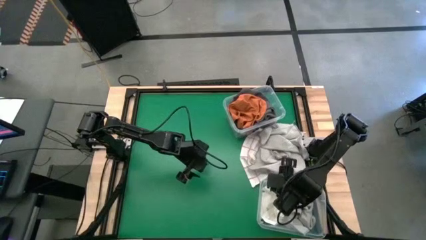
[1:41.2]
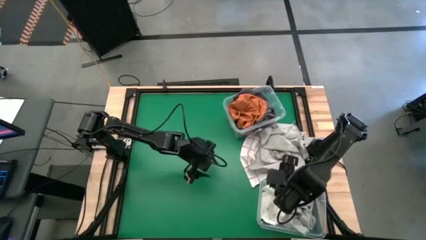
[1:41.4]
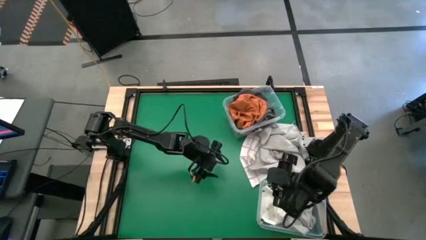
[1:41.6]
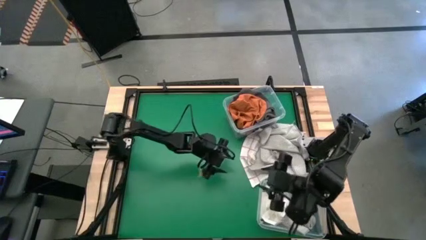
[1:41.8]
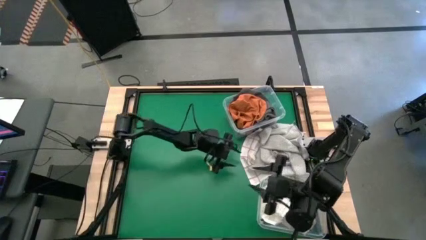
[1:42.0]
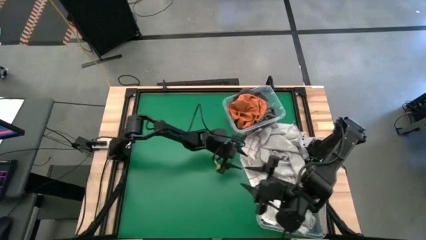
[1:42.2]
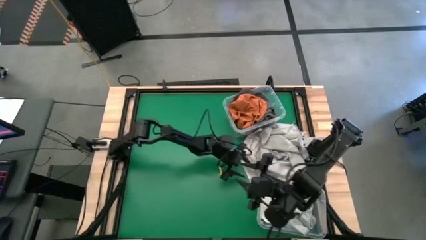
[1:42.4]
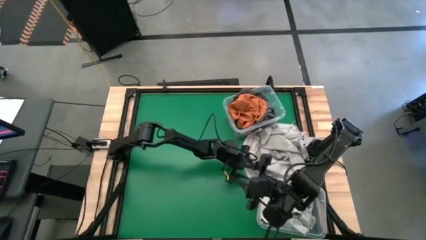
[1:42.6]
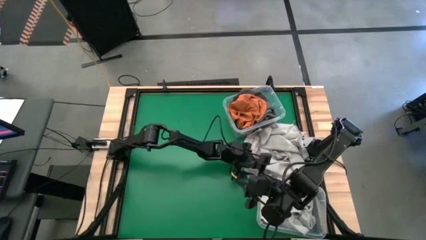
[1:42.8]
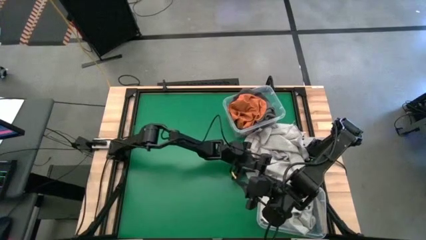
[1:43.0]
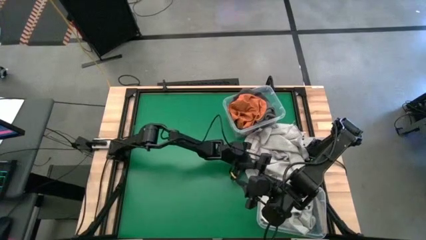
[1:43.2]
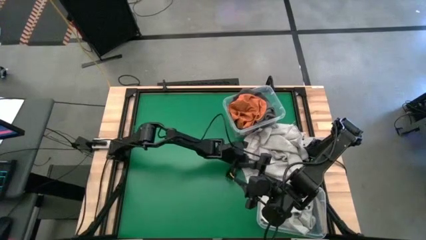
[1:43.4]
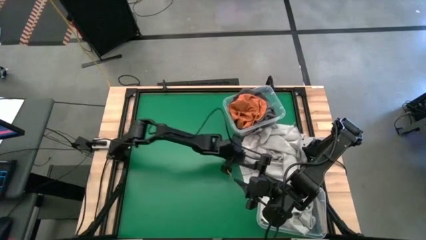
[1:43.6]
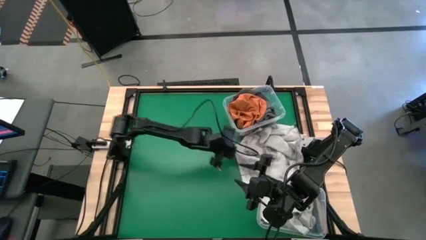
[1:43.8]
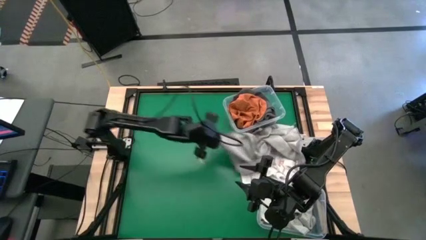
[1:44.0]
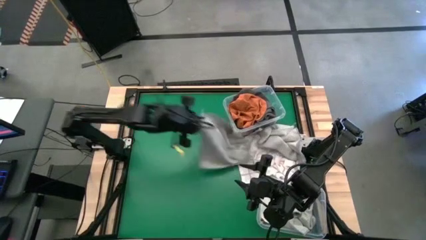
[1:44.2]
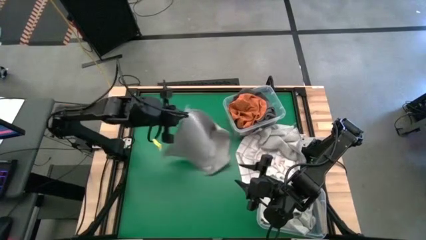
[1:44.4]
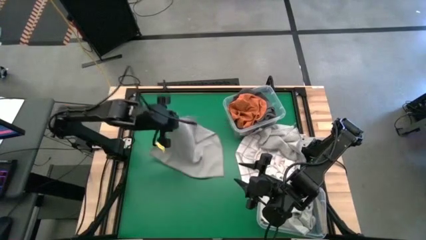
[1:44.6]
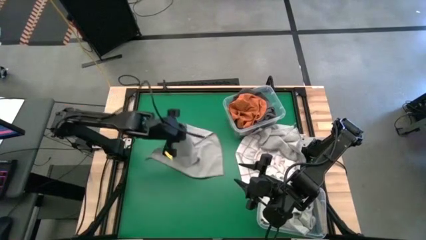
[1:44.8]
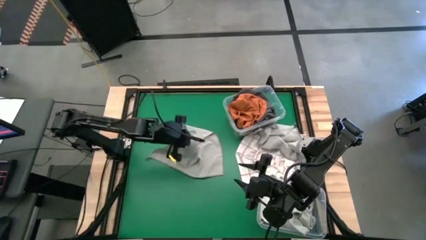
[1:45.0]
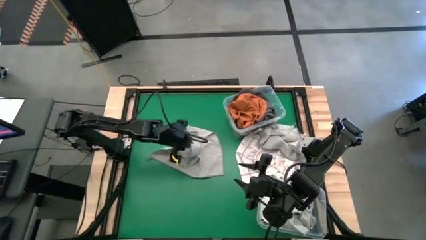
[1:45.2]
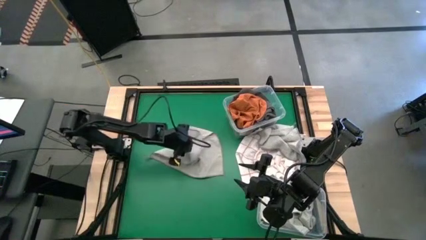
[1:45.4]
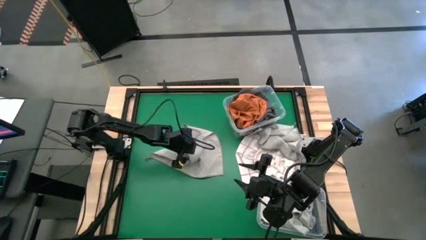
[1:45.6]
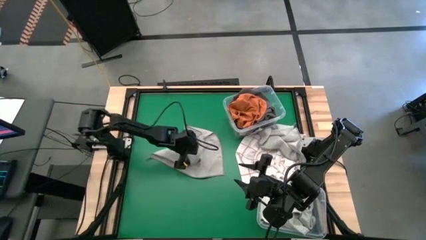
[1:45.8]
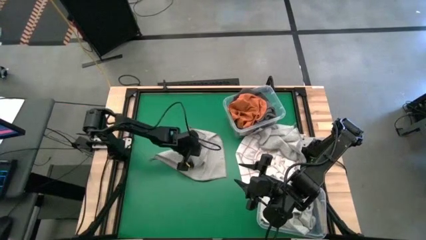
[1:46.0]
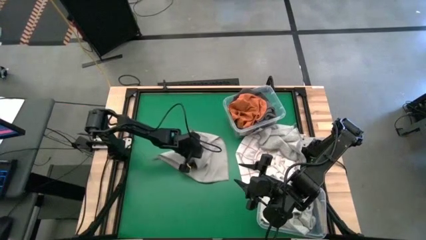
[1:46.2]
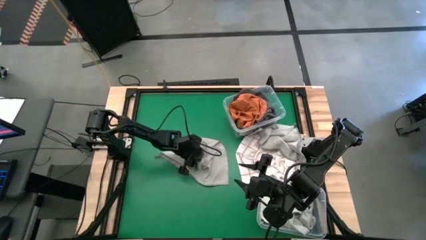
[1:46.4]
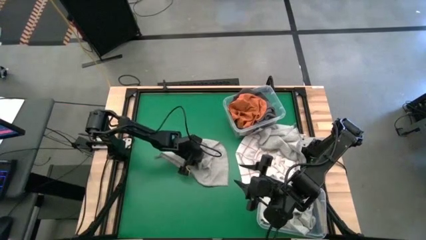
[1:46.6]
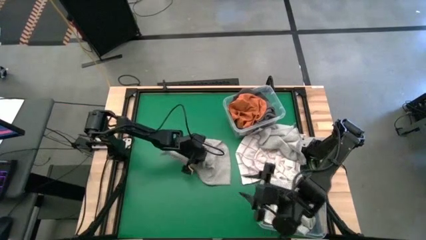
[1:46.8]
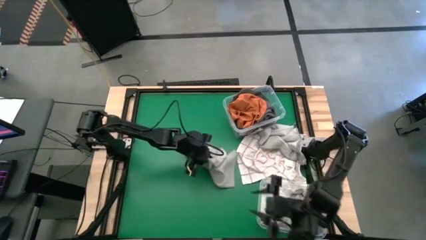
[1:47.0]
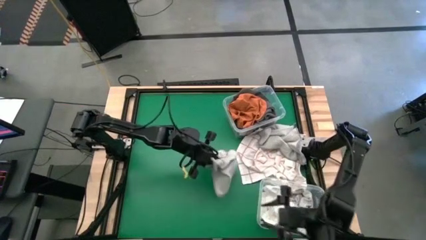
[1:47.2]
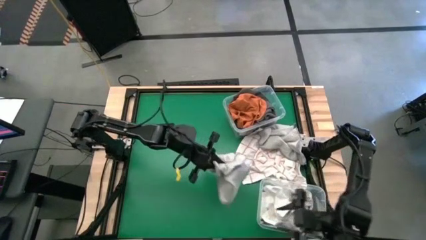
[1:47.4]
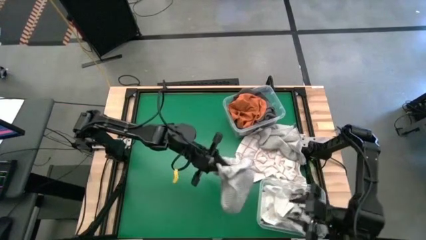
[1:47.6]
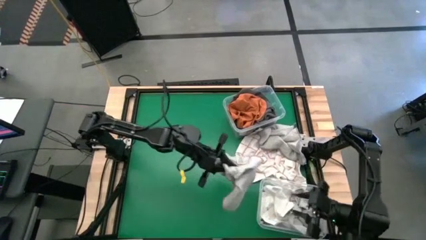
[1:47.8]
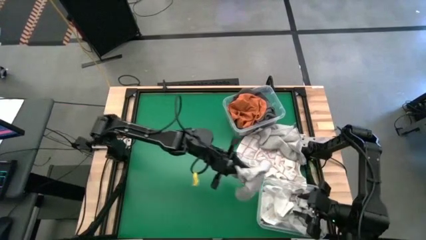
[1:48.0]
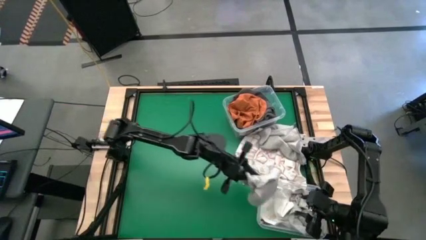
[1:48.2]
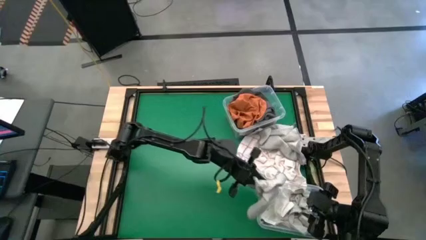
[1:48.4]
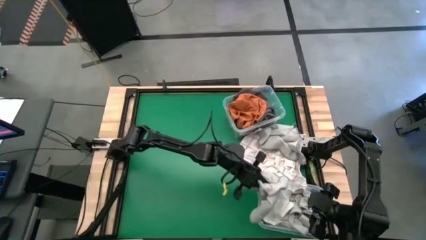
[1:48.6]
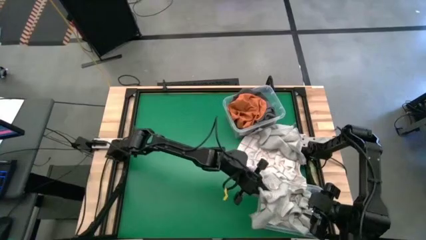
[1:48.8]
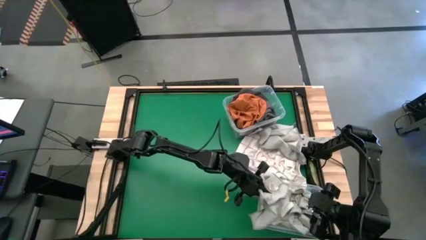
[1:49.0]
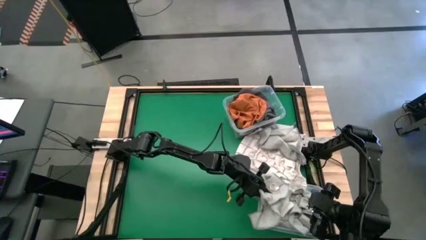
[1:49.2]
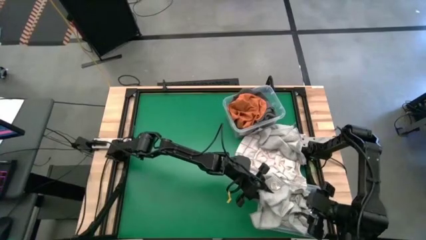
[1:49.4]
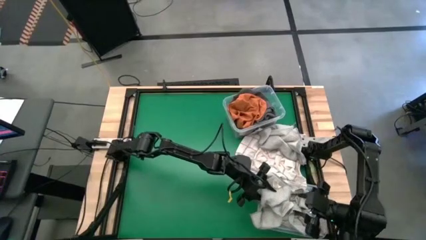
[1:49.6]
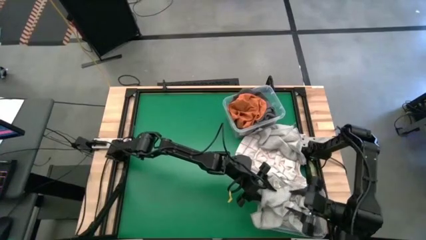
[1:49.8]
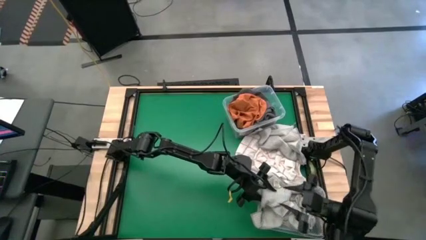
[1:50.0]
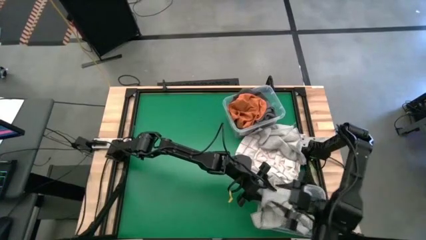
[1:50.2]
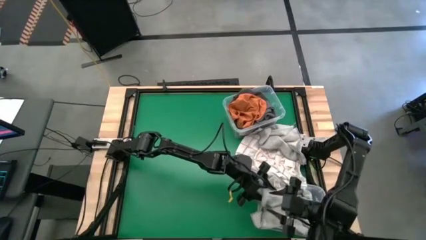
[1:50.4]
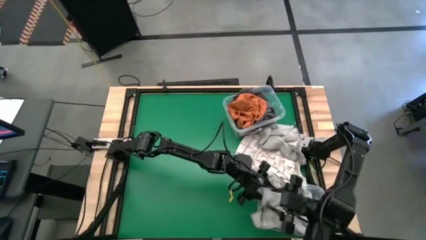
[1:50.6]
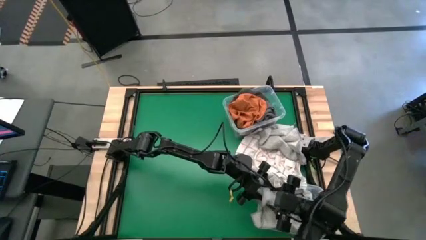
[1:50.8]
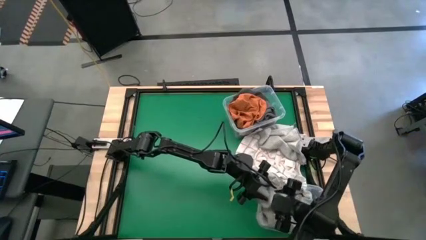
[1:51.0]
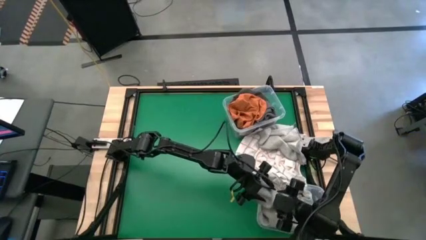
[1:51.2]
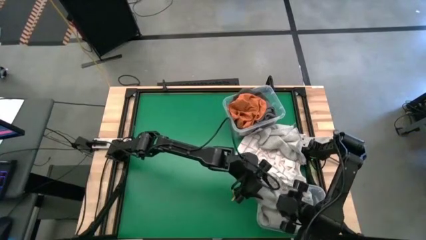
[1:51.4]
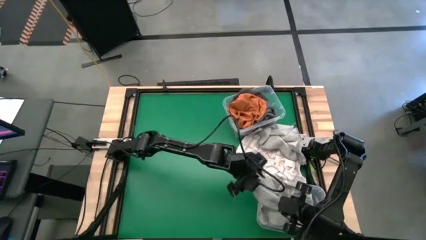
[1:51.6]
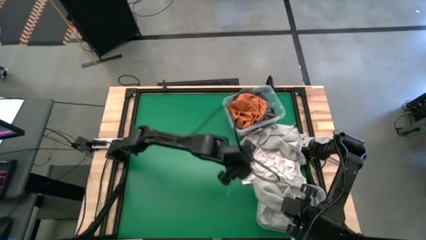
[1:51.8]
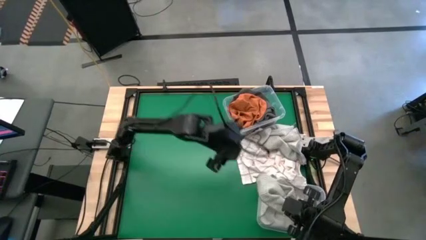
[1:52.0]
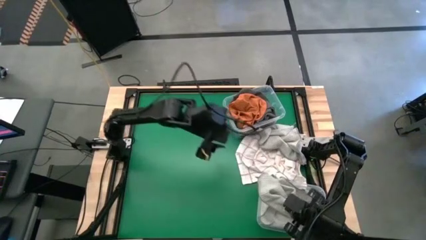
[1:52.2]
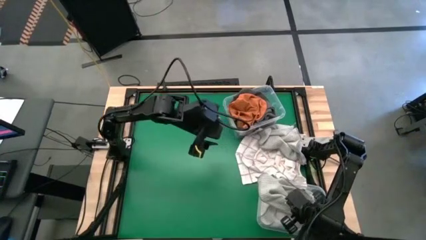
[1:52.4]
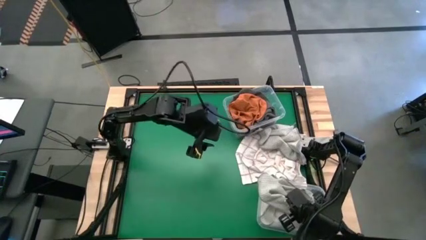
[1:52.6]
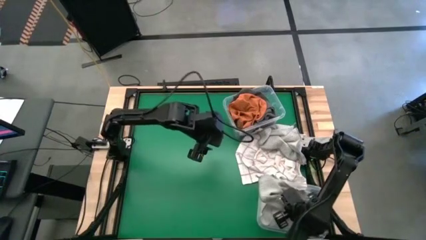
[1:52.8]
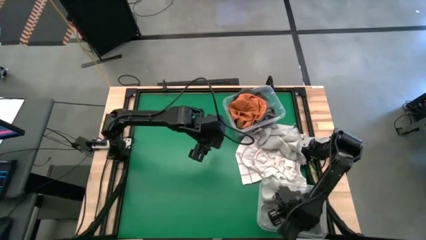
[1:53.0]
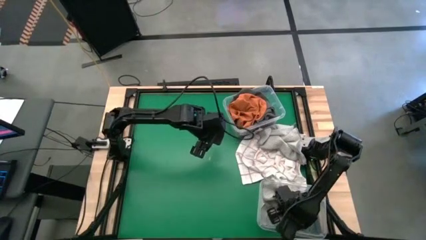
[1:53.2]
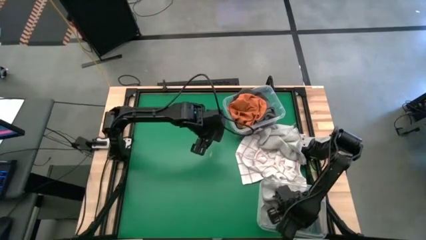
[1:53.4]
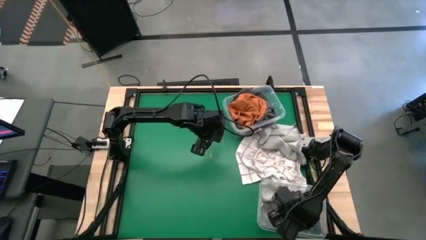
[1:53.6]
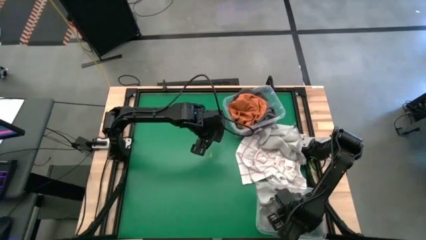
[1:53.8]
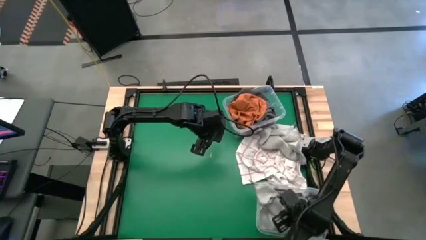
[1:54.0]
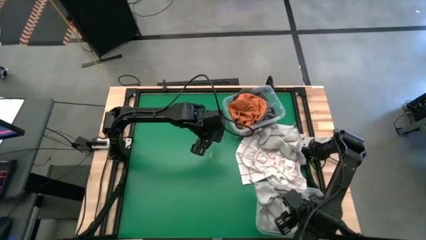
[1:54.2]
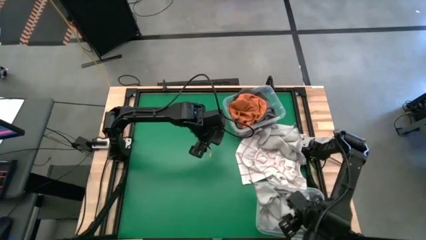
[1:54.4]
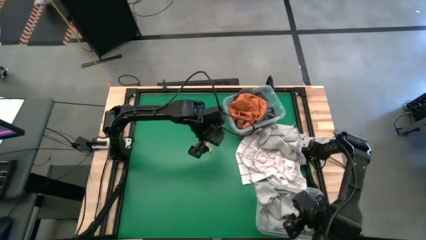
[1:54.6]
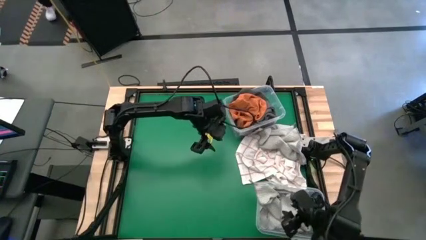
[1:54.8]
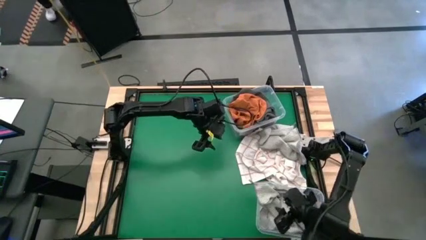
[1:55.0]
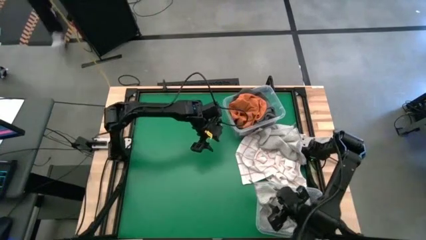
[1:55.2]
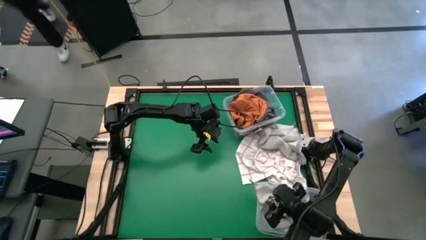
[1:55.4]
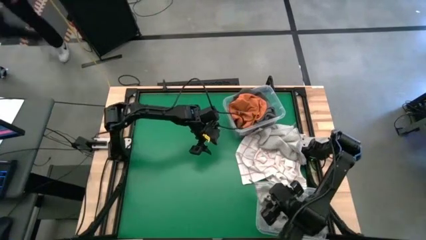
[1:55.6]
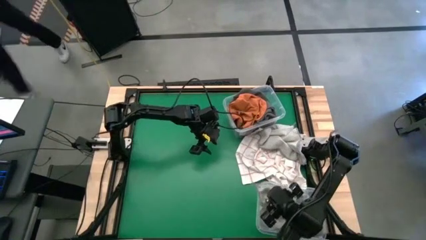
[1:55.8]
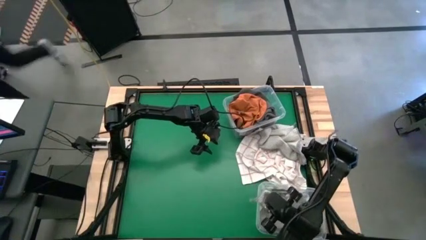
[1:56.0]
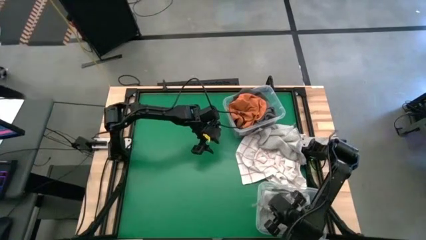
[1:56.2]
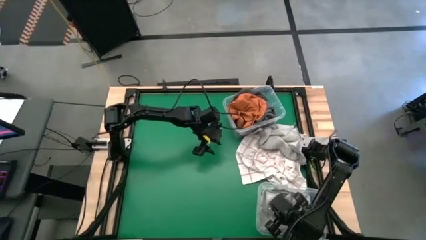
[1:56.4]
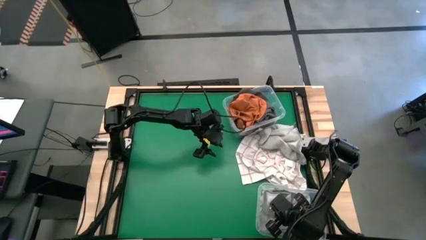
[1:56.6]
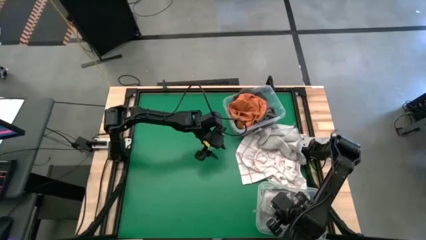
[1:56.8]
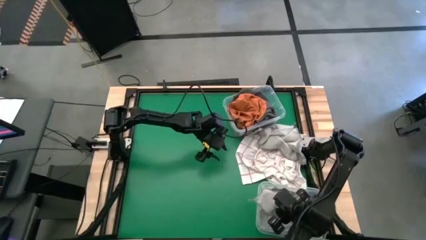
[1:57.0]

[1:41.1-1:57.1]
Task: Sort towels by color in basket
Put the light gray towel into the bottom transparent bin
